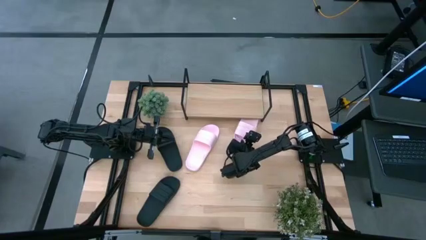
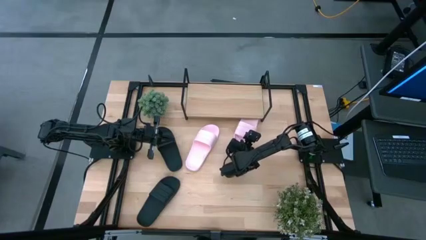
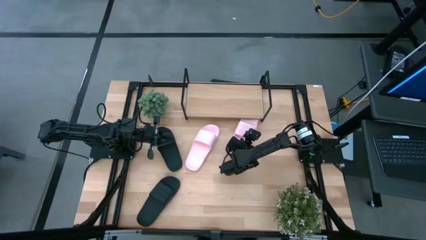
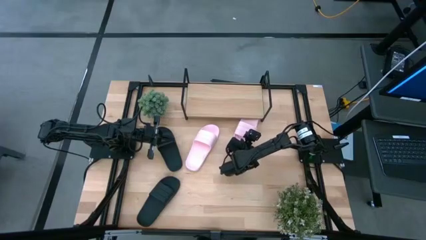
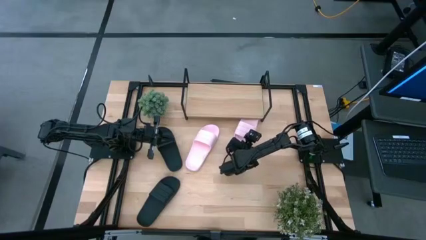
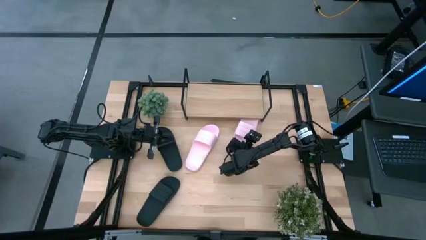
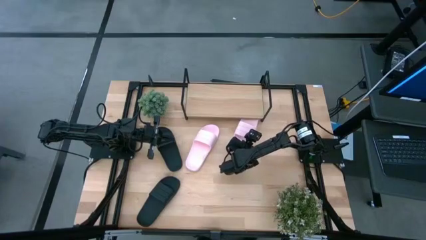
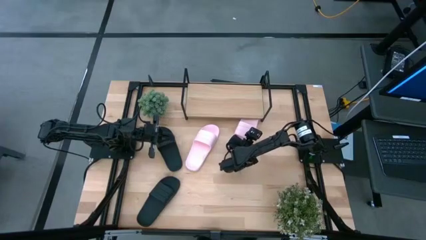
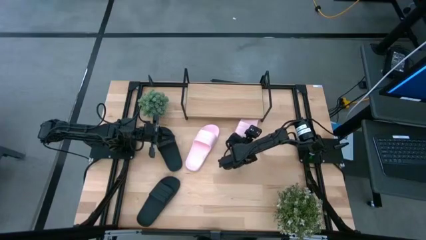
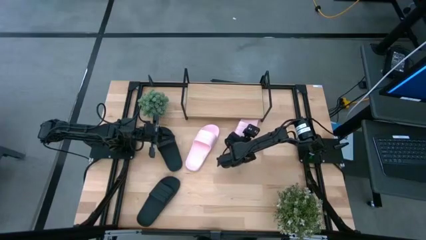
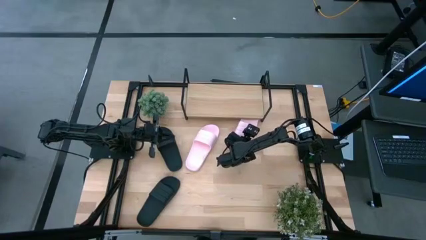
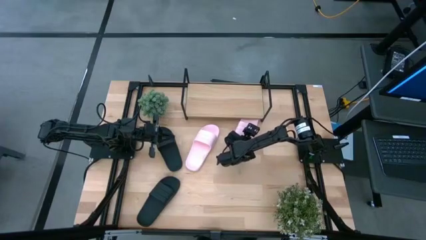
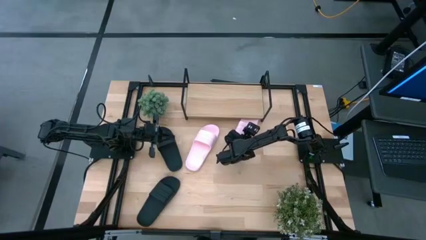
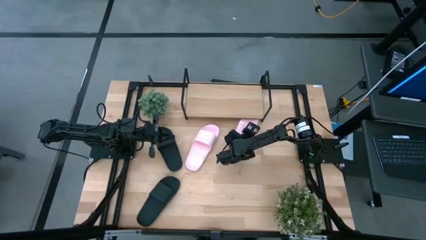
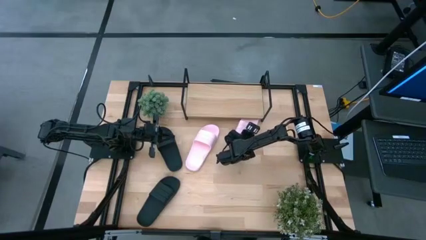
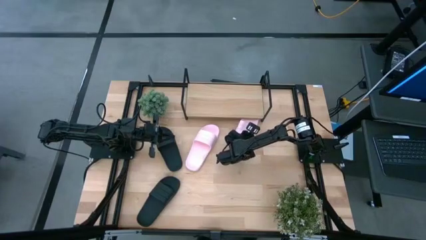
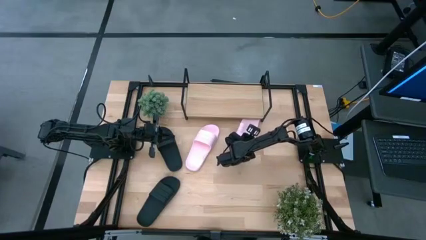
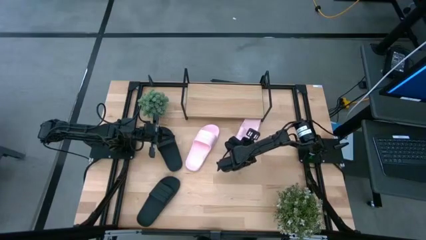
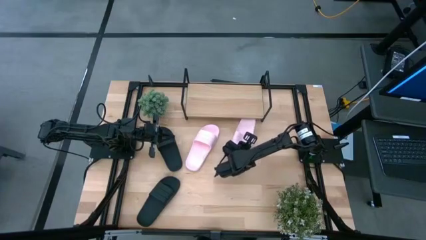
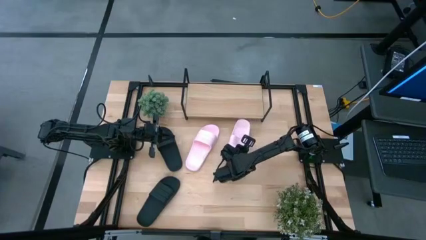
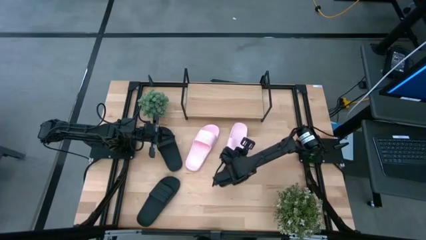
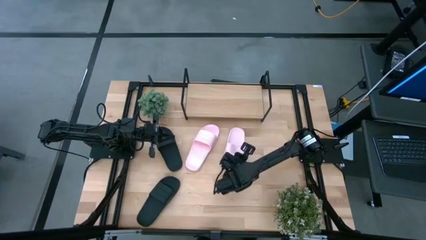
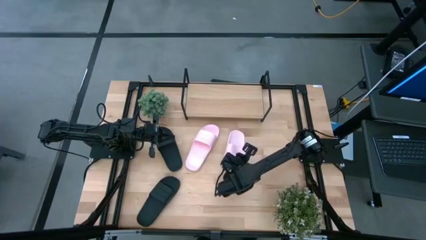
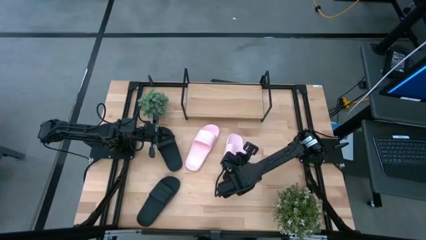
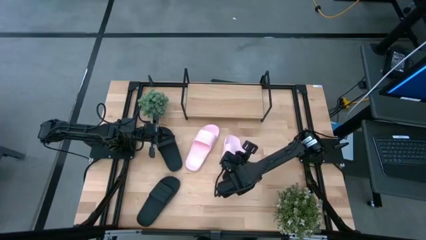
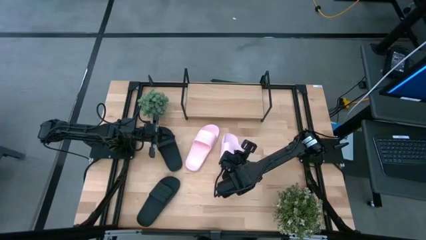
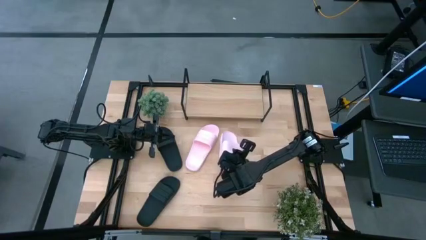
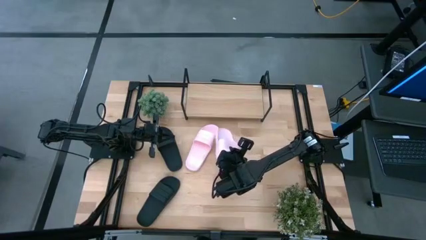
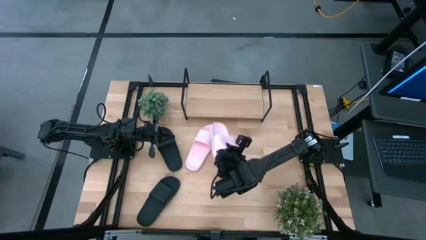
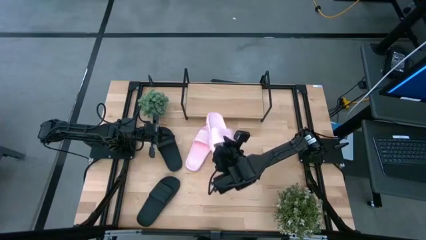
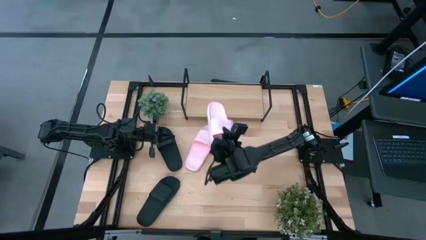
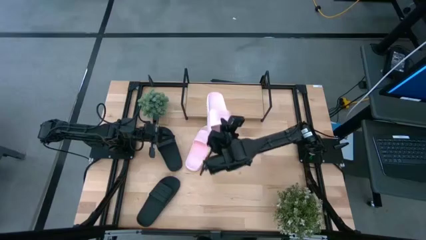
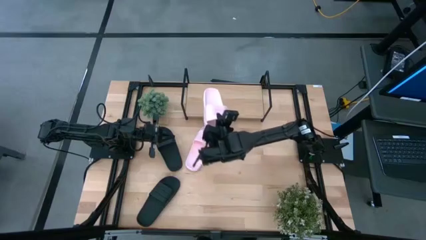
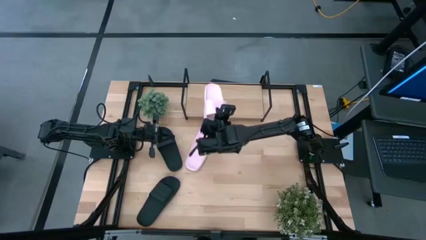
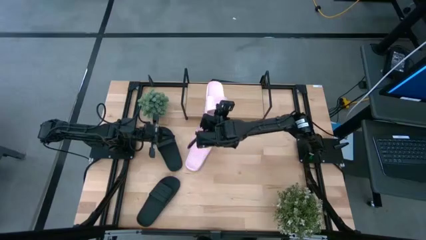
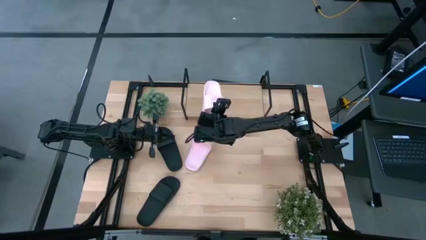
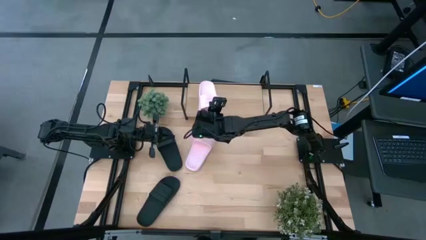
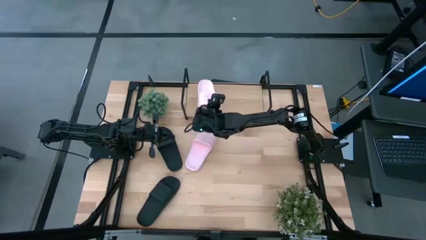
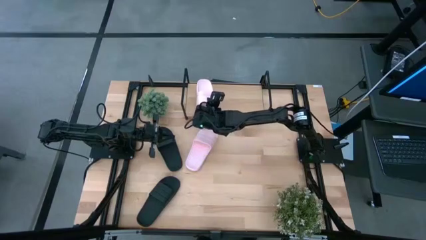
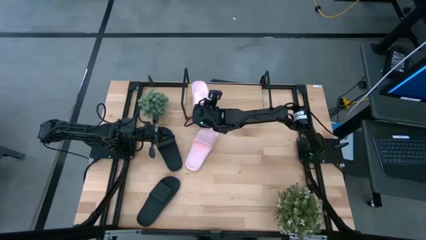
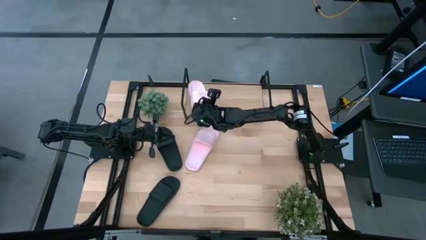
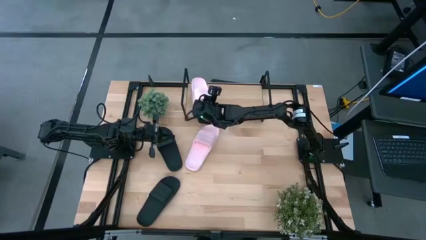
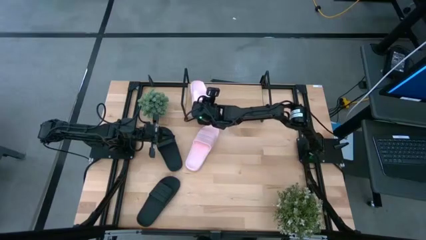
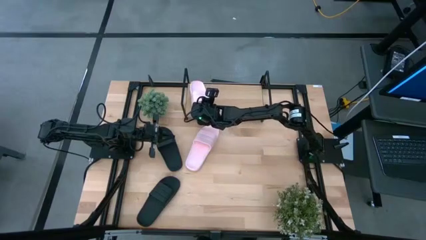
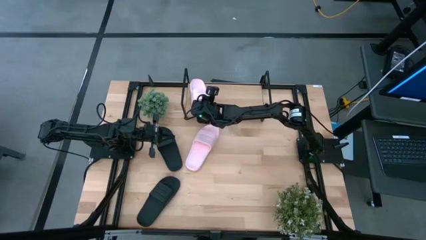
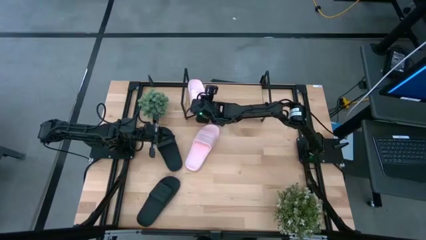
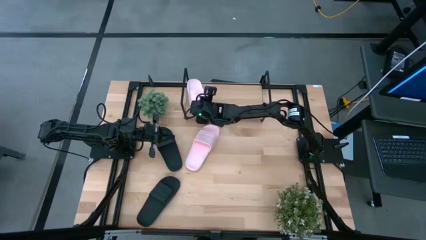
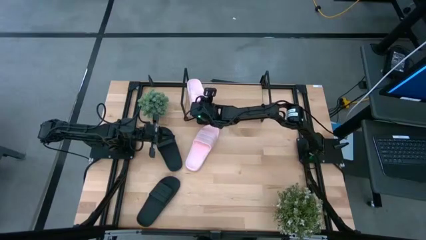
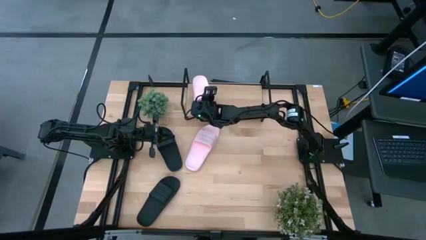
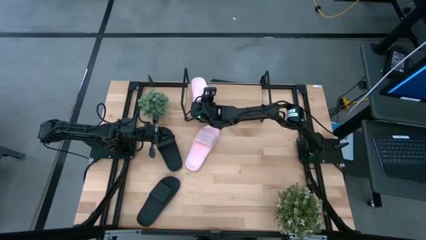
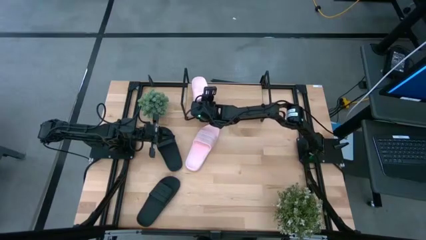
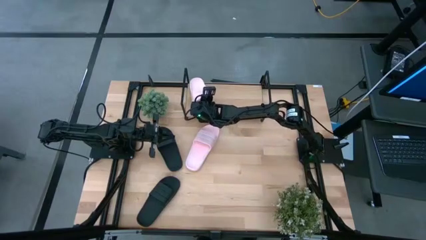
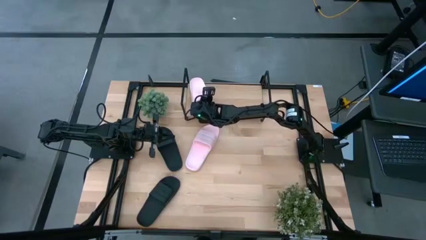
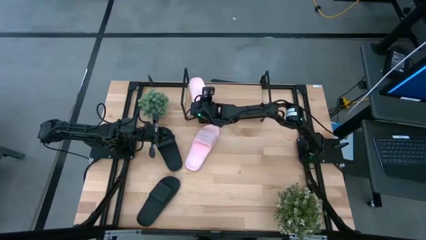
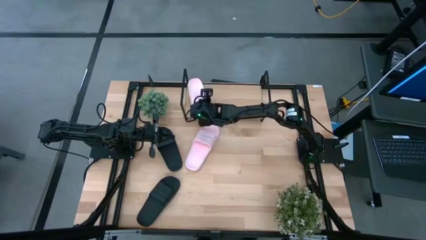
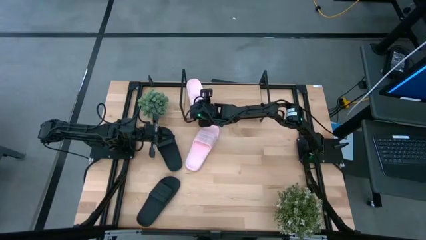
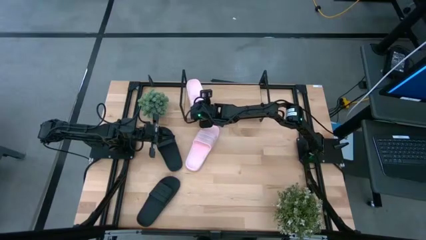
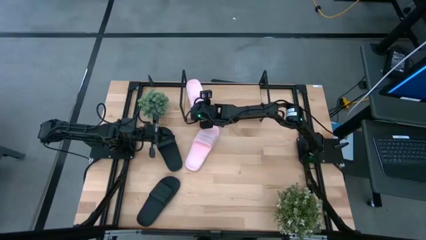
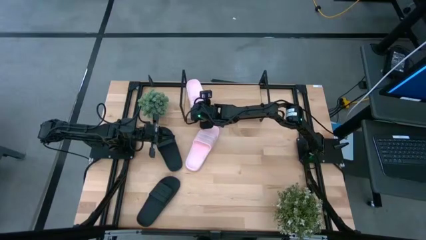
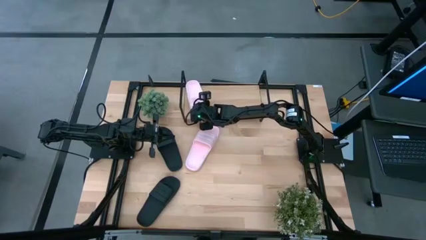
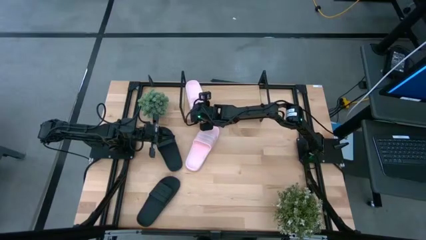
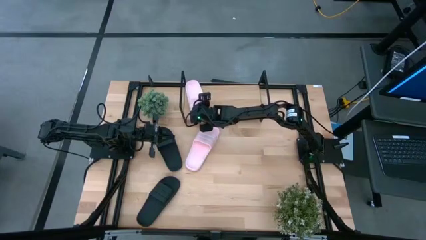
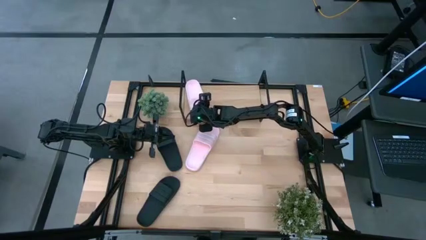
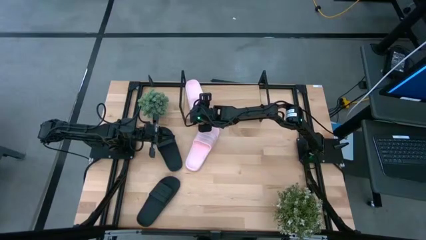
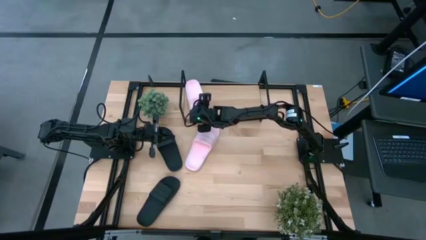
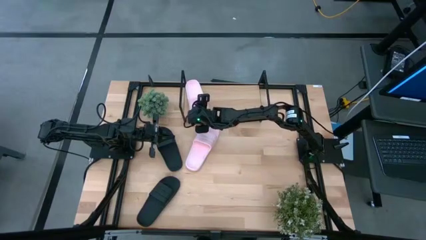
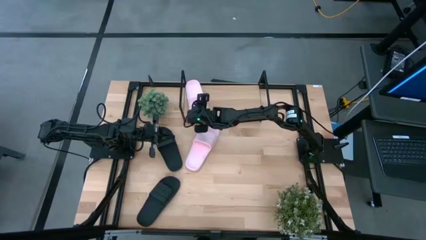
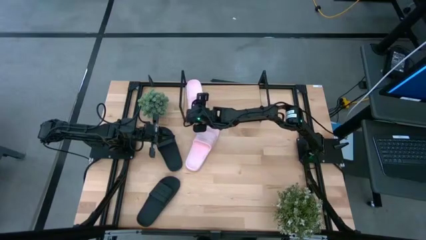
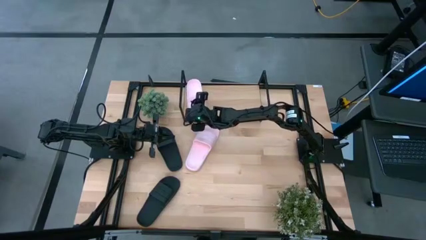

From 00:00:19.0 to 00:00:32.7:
Task: Pick and place slides into the shelf
Put the right pink slides on the shelf

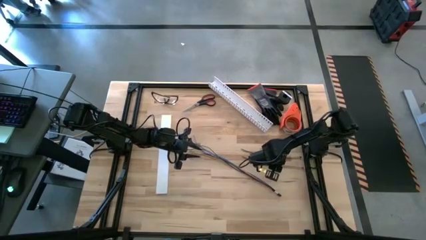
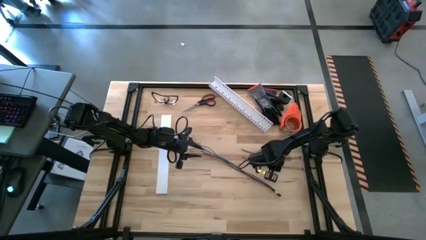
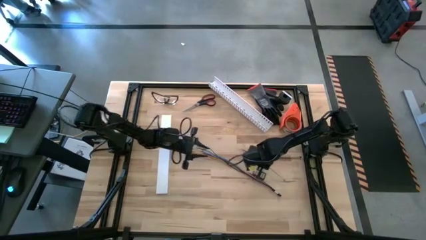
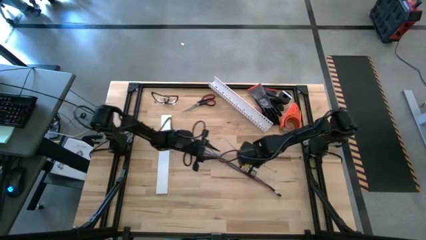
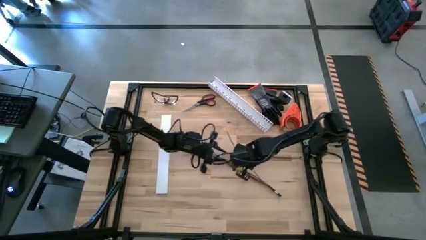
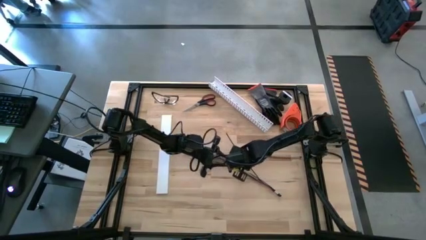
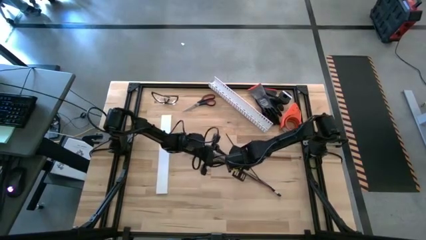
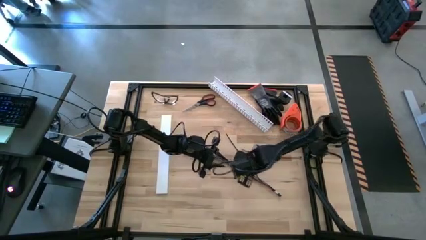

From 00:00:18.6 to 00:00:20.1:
Task: Ziptie cables
Wrap the bottom black zip tie on the cable wires
